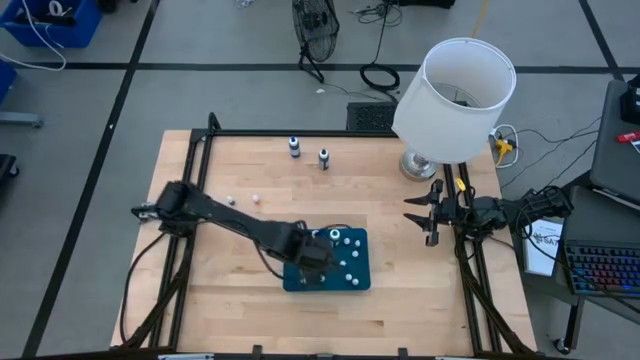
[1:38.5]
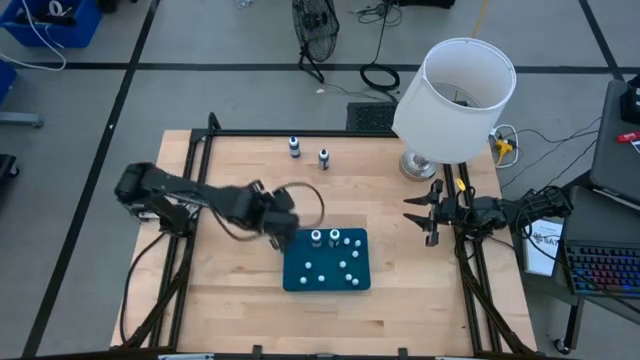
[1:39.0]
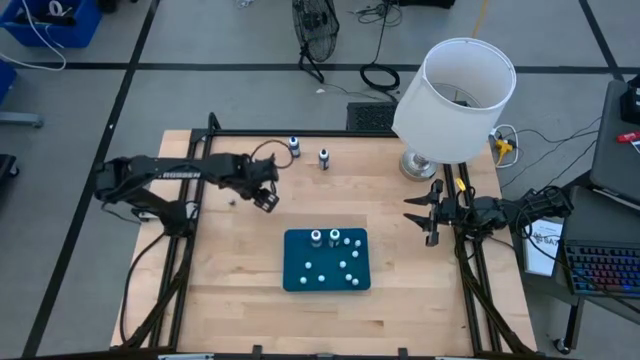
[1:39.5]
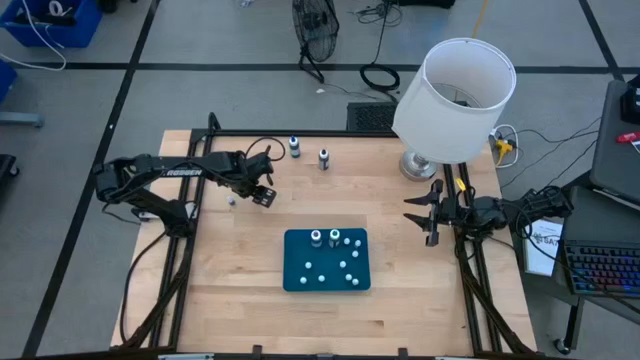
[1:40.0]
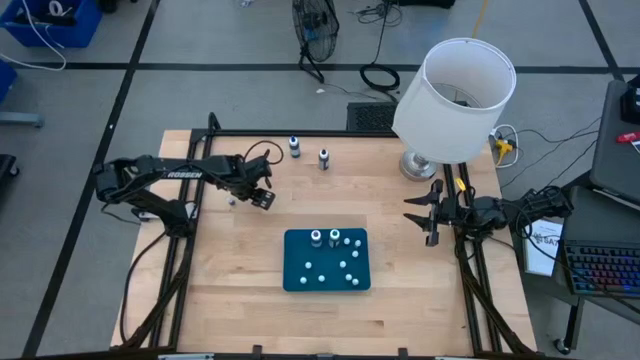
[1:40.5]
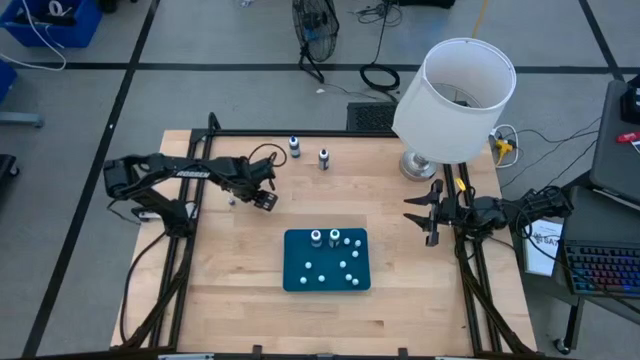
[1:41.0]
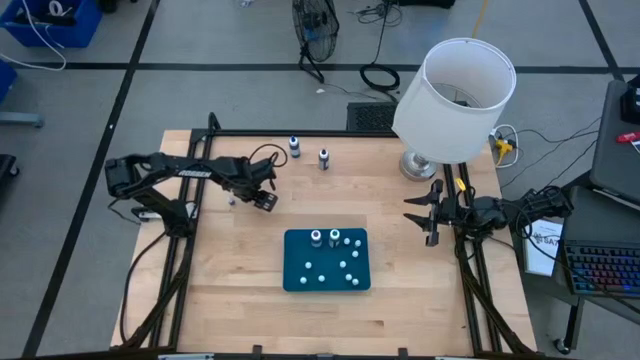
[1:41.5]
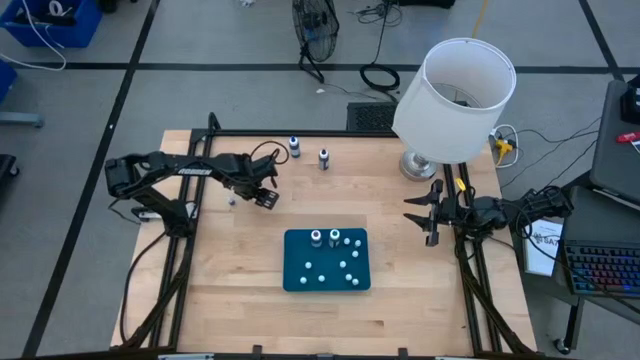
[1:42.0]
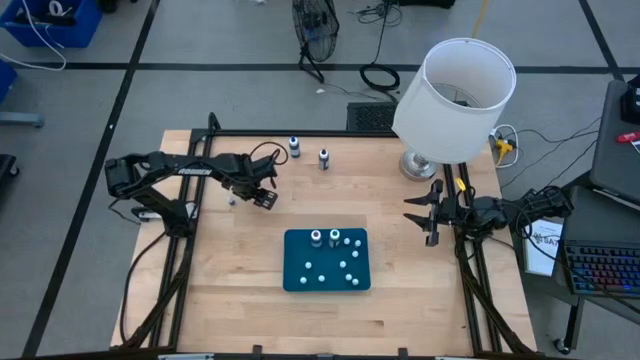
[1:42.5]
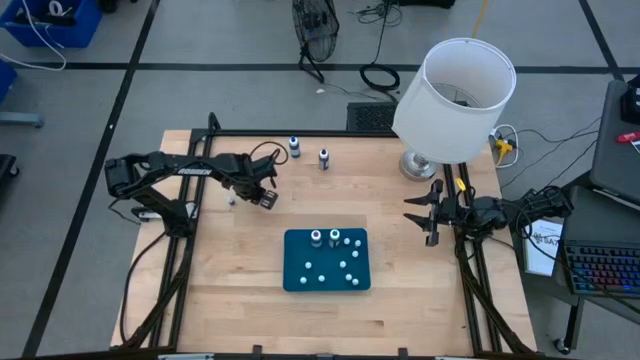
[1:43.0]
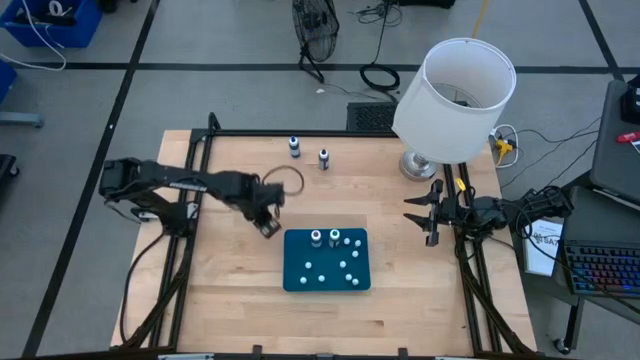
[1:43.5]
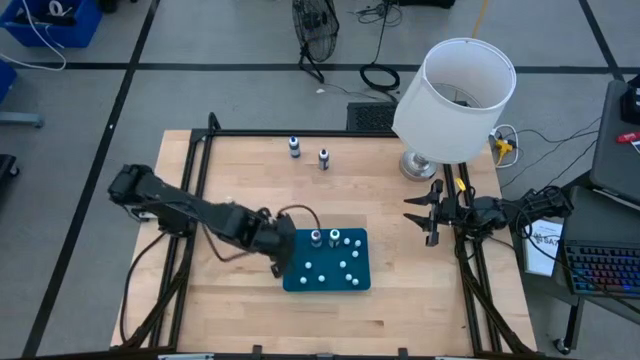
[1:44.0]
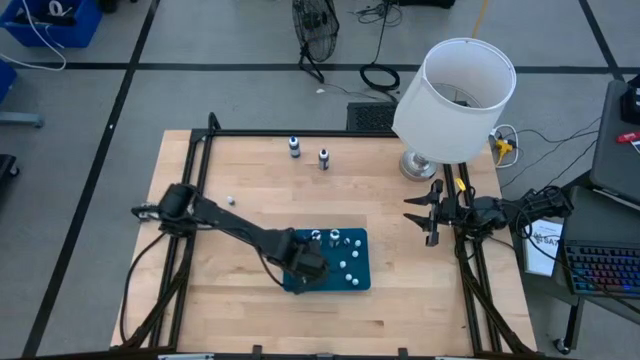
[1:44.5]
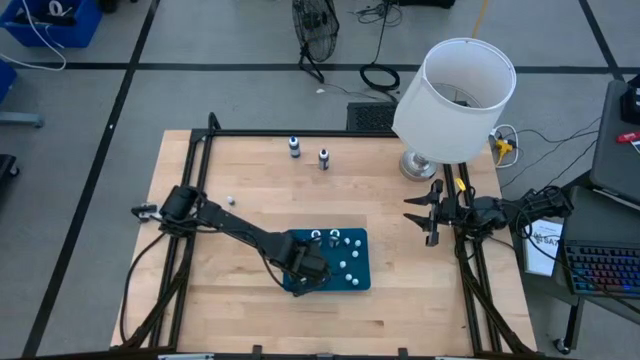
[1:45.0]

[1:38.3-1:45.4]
Task: Pick & Place food coloring
Put the small orange food coloring bottle into the blue bin

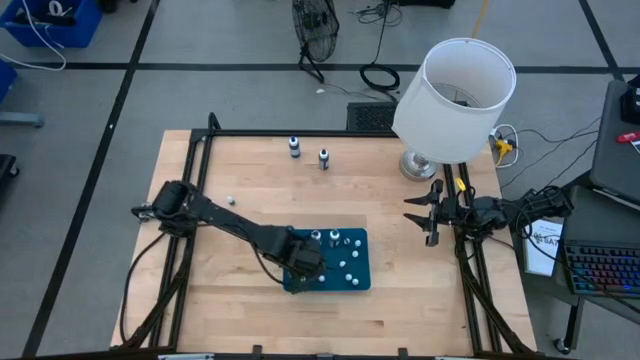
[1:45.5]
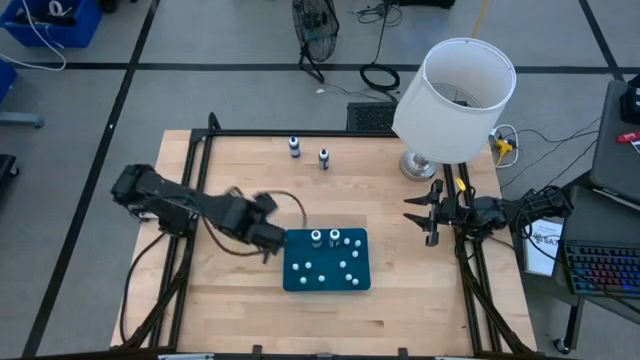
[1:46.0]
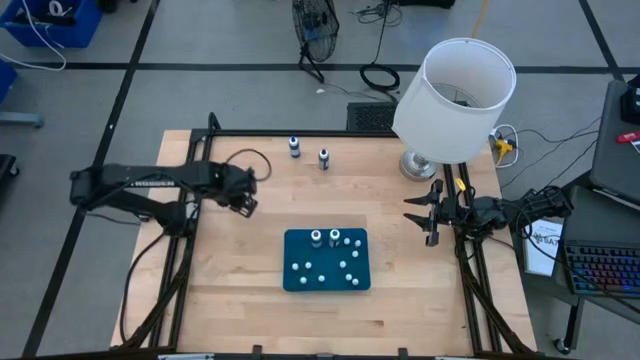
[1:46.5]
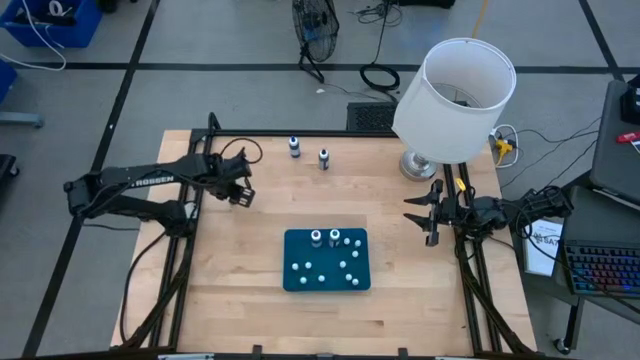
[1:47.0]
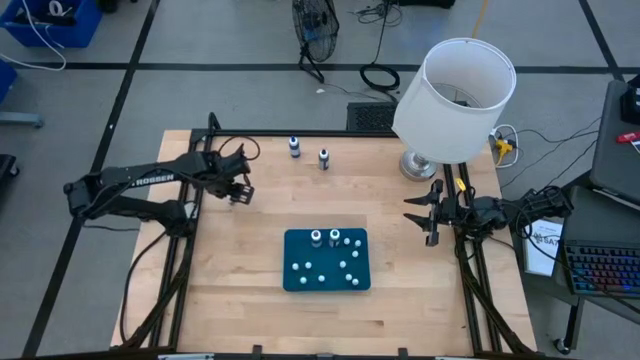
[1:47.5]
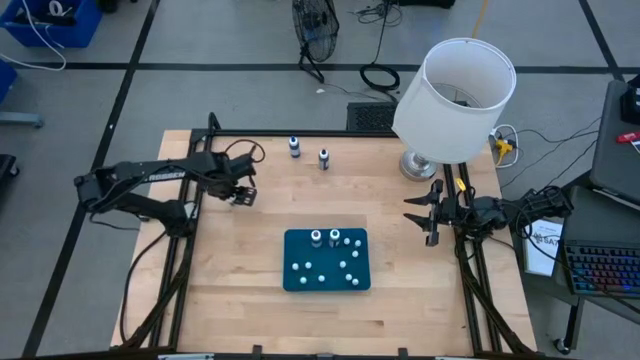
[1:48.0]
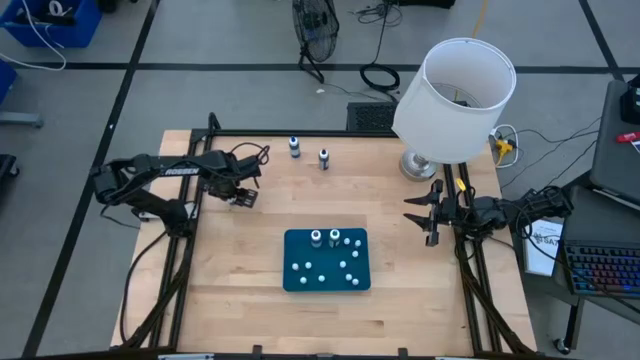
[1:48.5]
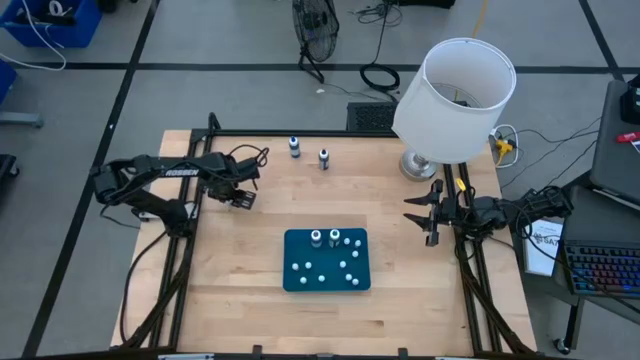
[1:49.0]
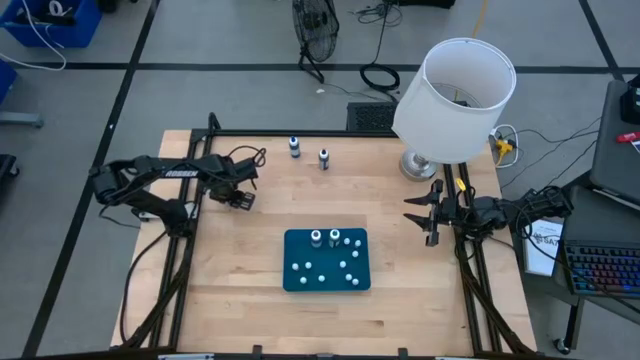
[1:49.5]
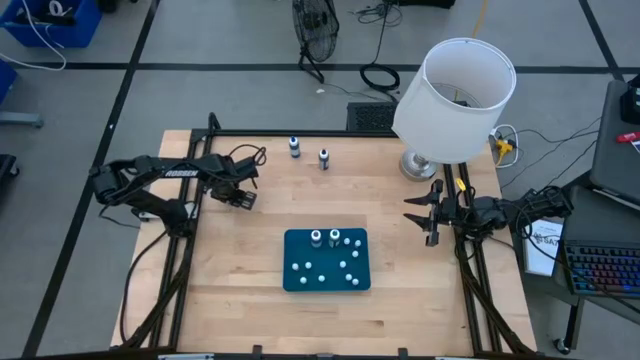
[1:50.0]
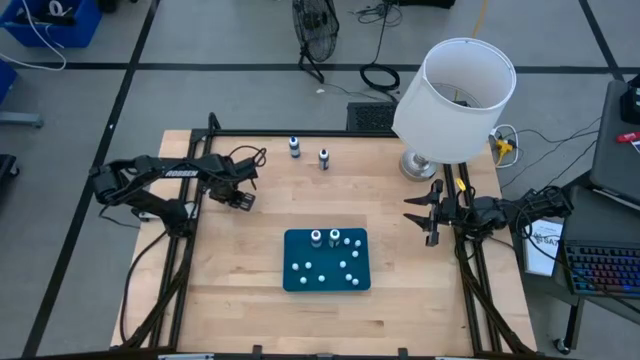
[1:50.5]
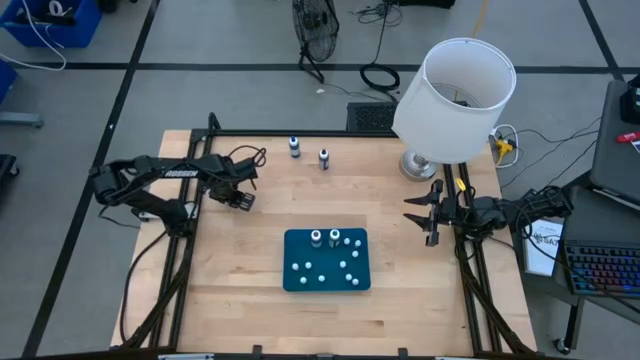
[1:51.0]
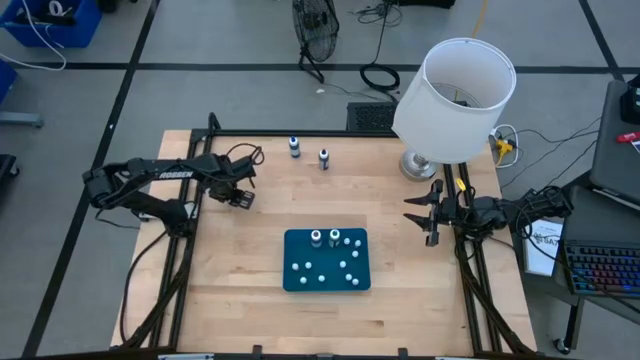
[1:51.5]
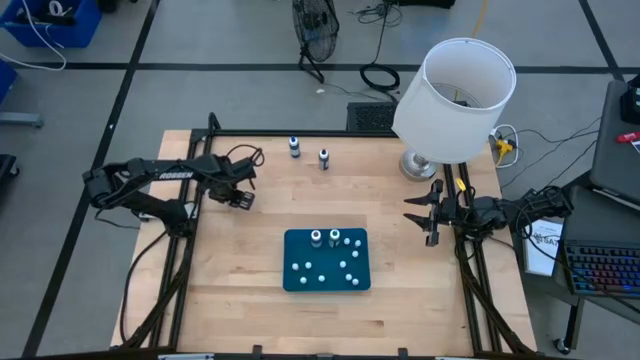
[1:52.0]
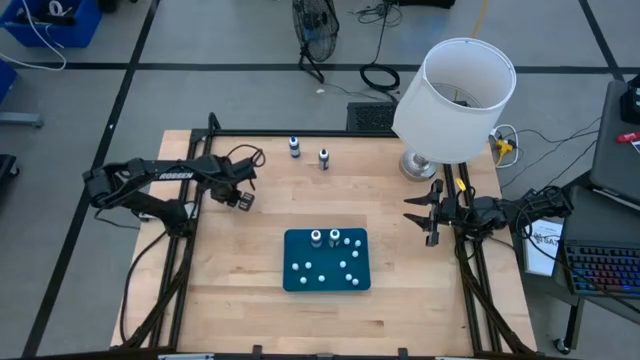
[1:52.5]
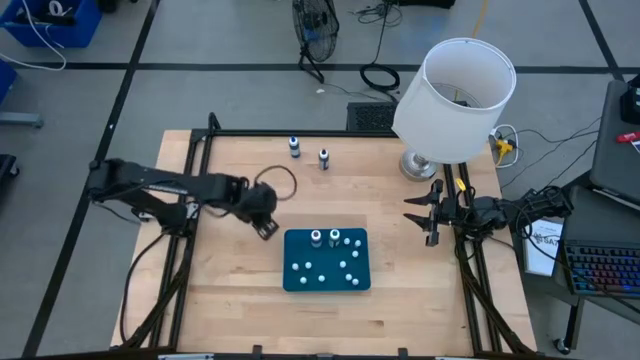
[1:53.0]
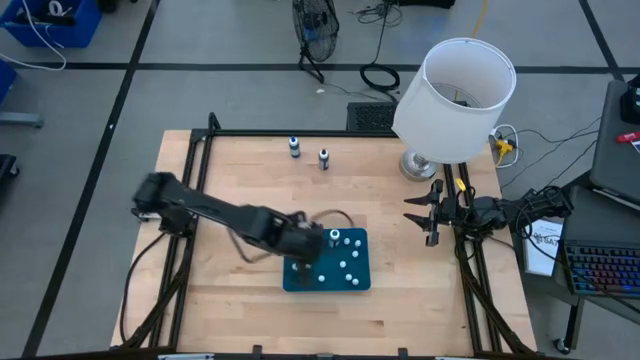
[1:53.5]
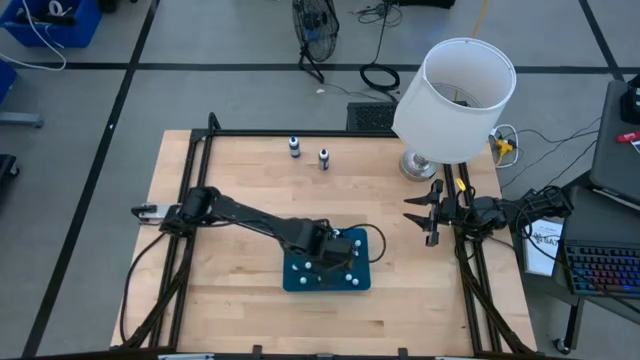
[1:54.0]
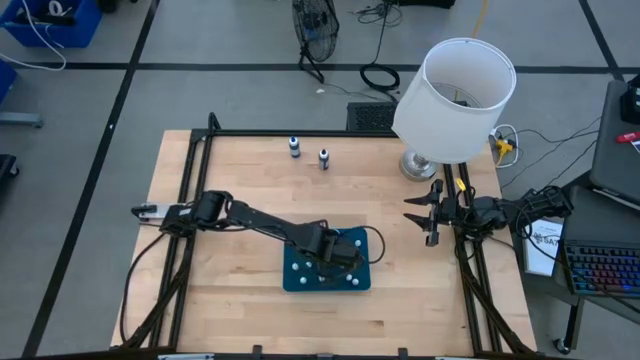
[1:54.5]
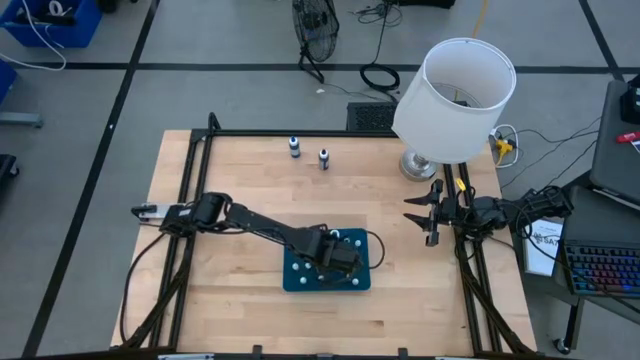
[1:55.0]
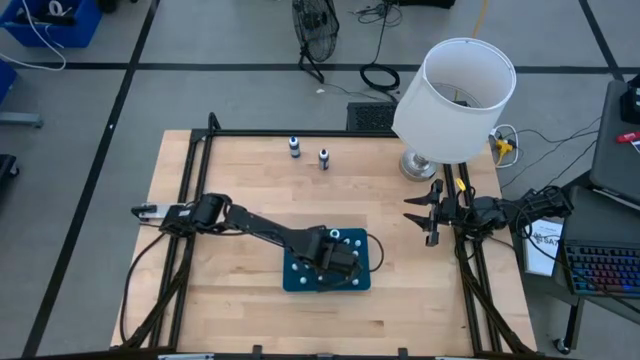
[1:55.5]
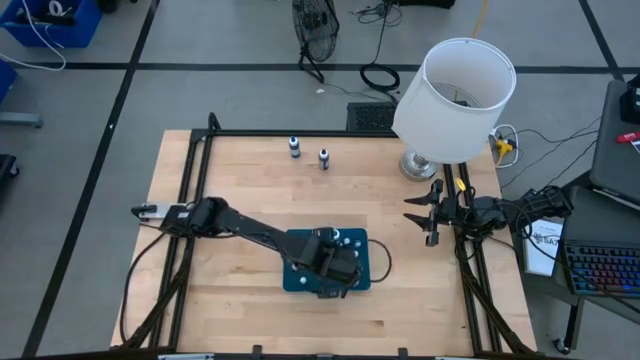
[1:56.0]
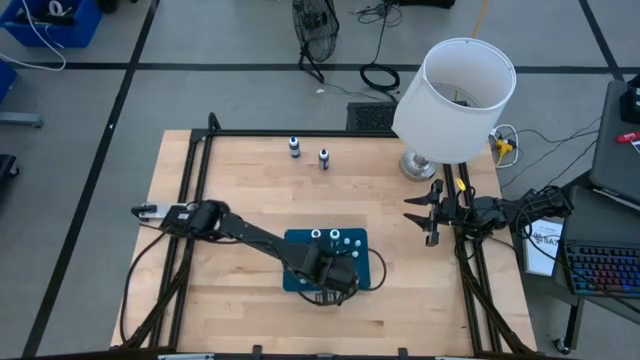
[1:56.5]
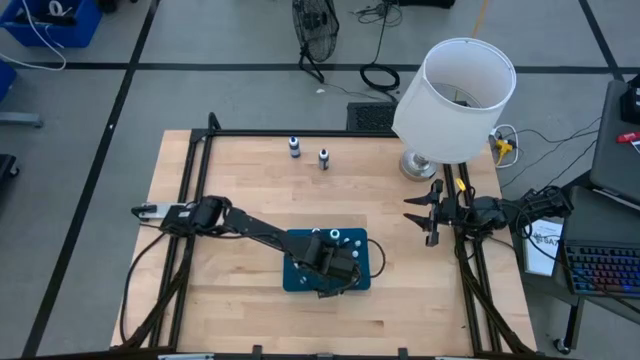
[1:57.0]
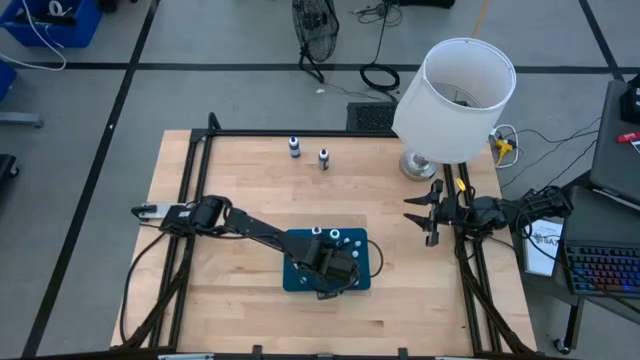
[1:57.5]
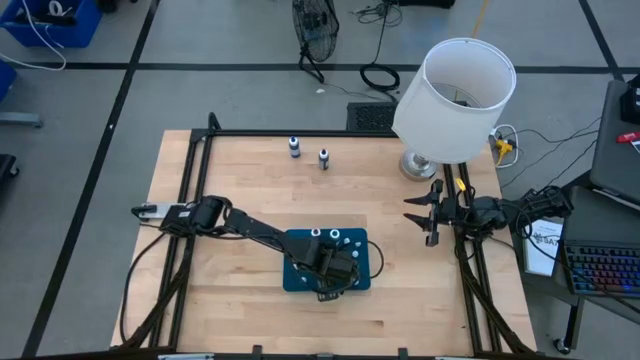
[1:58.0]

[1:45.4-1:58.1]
Put the small purple food coloring bottle into the blue bin

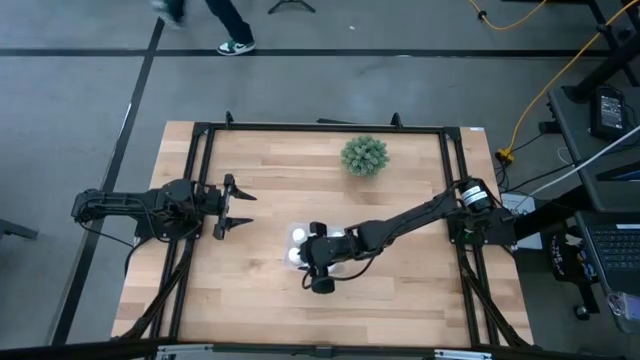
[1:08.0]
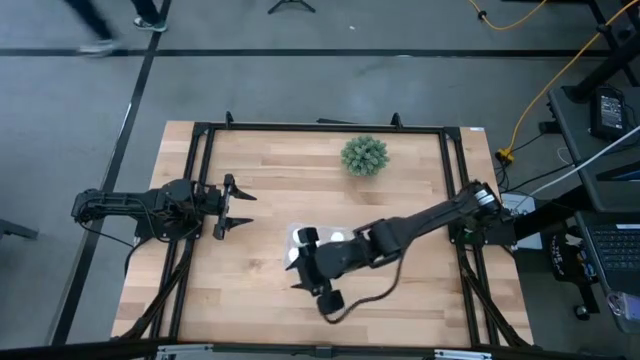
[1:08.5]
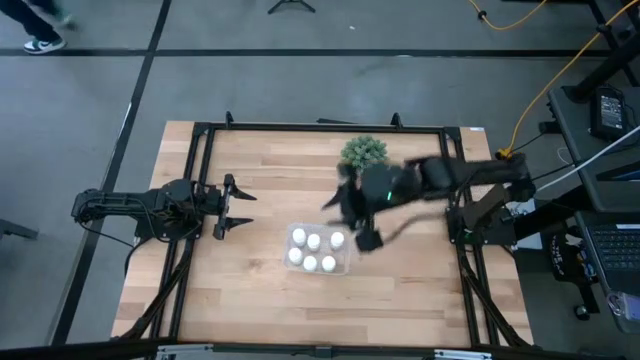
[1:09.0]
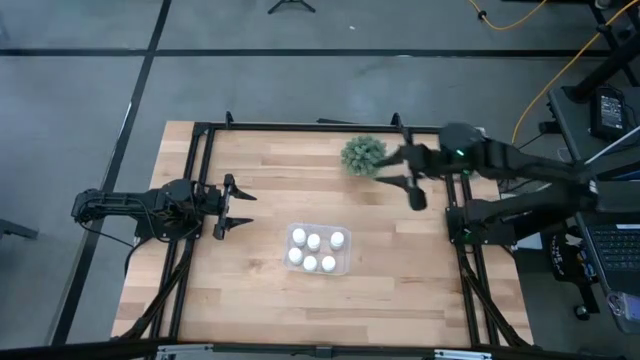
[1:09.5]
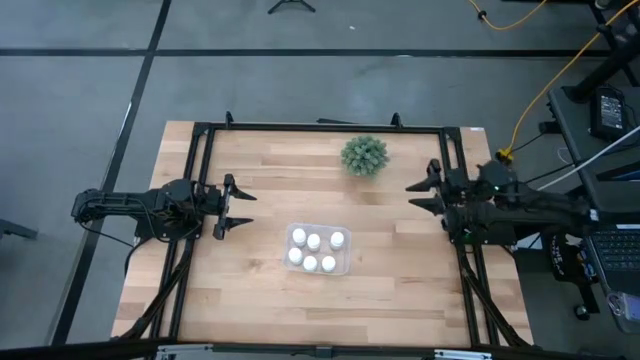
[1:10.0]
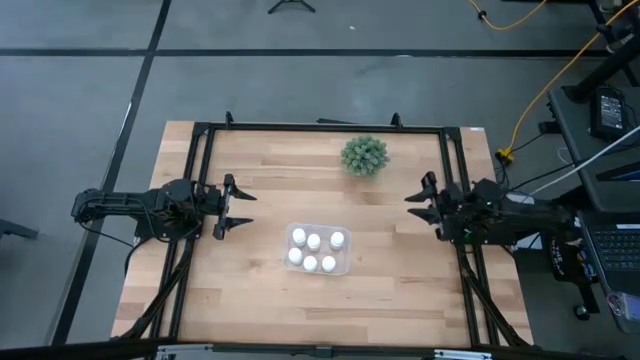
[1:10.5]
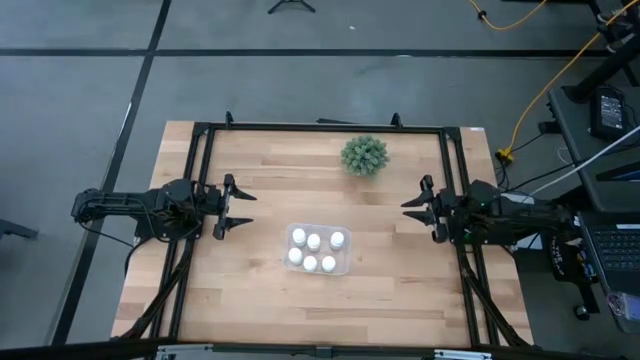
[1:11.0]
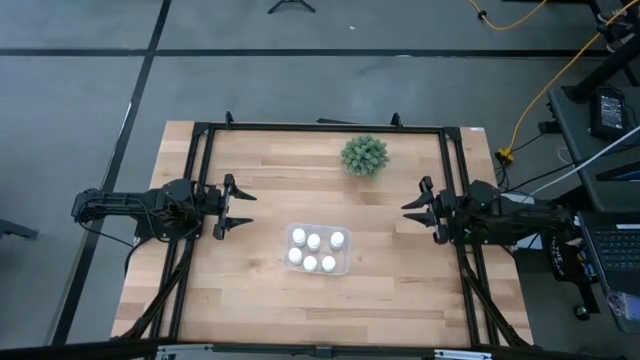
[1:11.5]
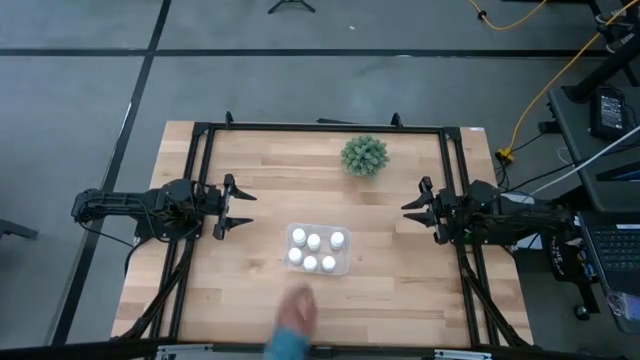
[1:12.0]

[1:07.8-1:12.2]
Task: Pick and place pill bottles into a basket
Return to Home Position
